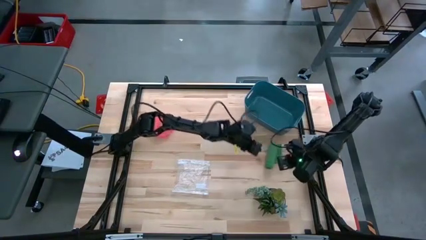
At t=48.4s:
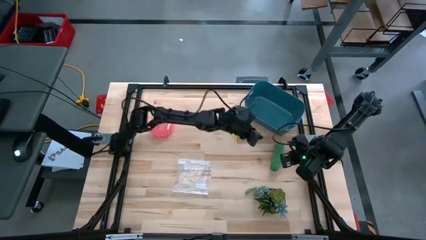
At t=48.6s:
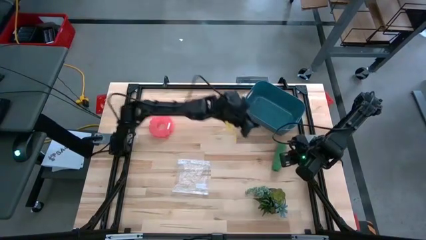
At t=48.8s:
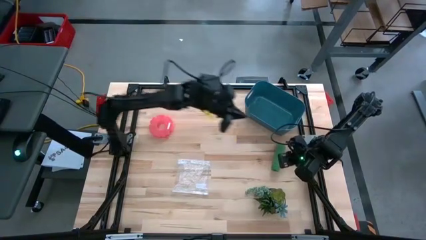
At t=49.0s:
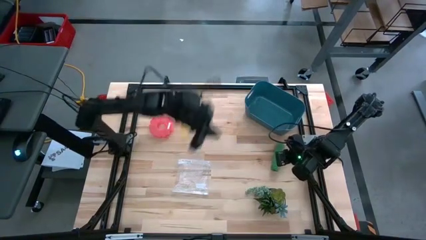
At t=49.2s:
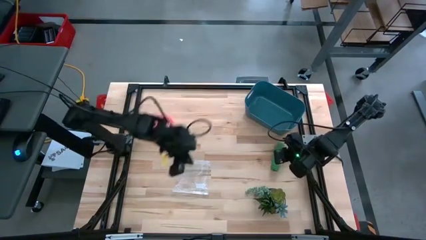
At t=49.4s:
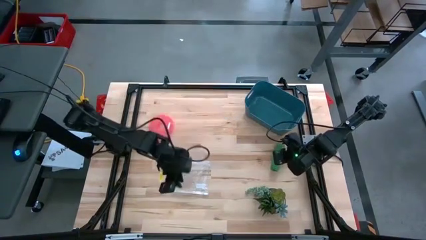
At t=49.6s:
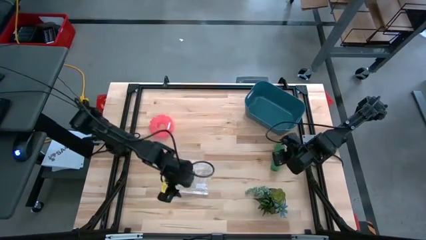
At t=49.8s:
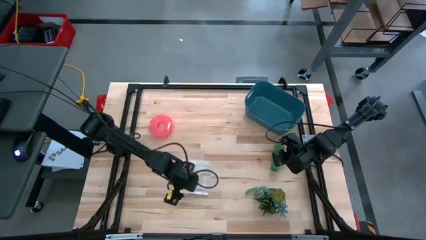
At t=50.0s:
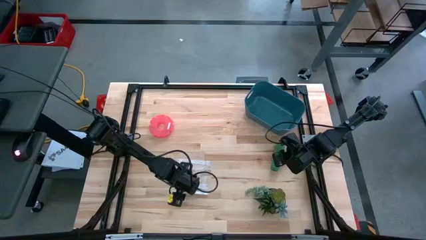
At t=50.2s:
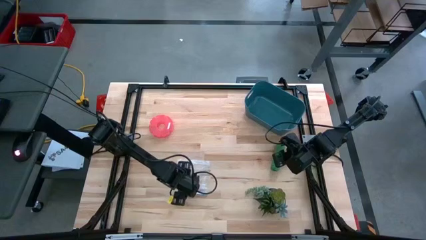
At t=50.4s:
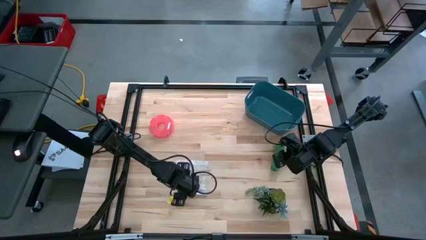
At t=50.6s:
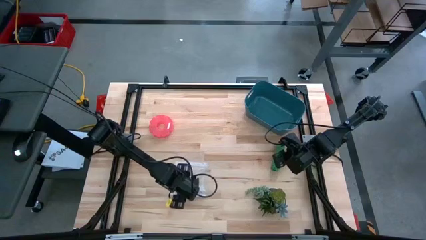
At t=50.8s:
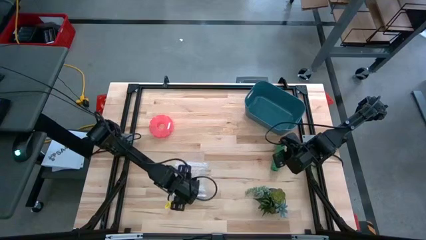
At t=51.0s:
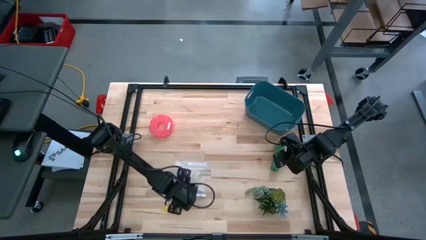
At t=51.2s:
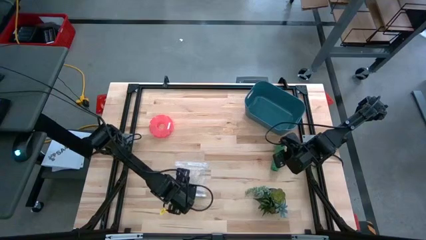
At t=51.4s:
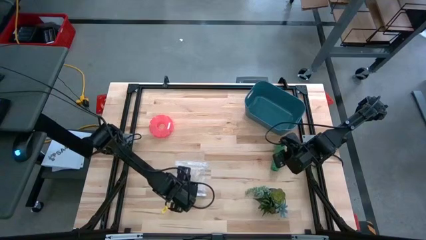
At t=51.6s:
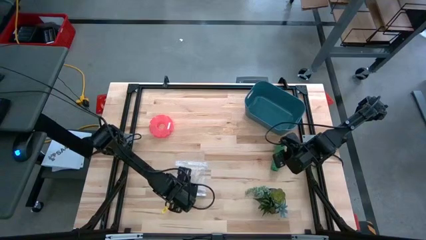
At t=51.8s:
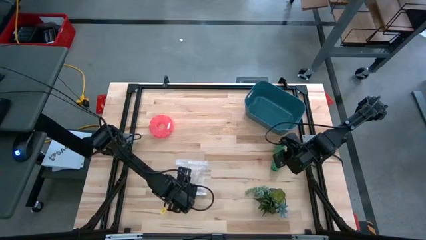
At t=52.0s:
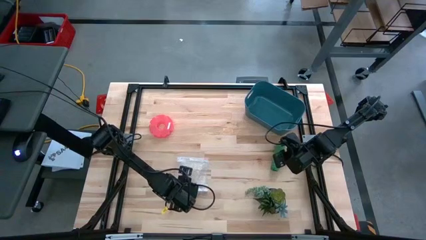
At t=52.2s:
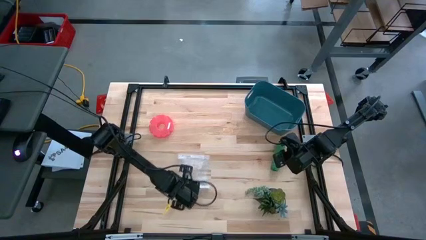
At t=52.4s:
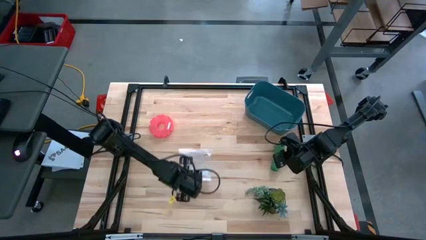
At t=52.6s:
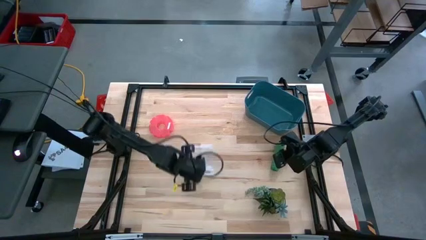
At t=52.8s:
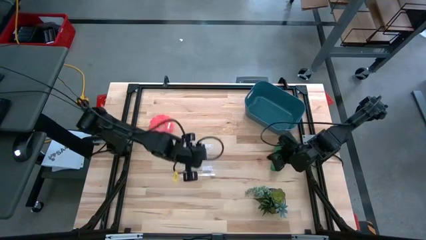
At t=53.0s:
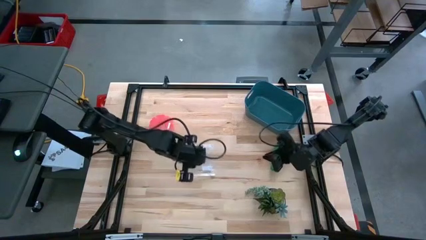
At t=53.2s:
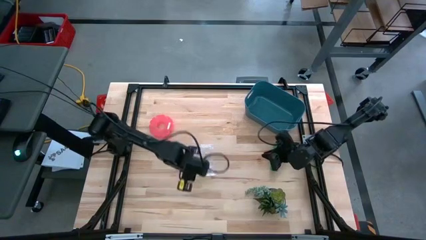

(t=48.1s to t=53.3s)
Task: Roll bandage
Put the rolled green bandage into the transparent zip bag

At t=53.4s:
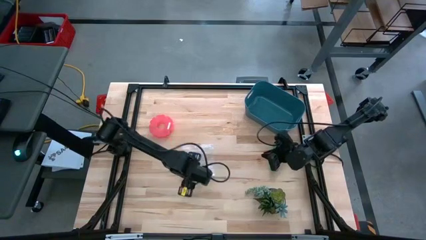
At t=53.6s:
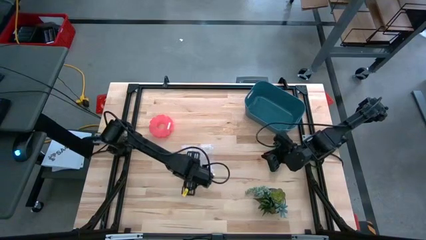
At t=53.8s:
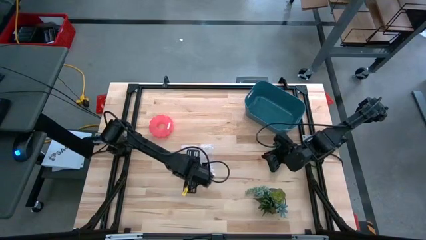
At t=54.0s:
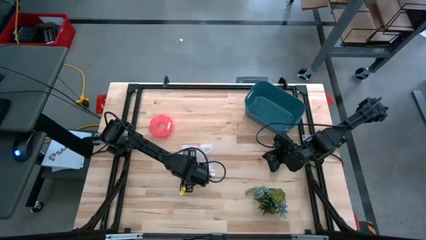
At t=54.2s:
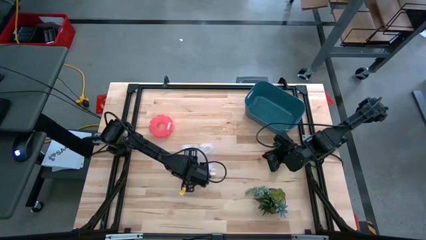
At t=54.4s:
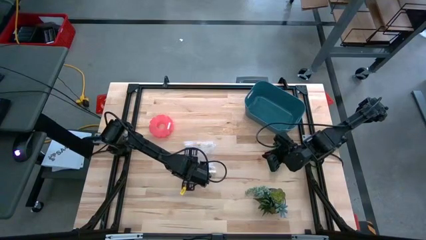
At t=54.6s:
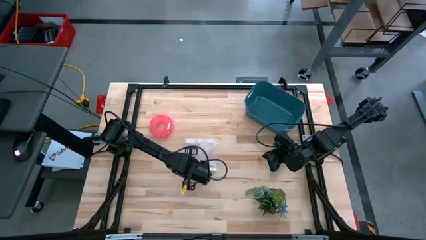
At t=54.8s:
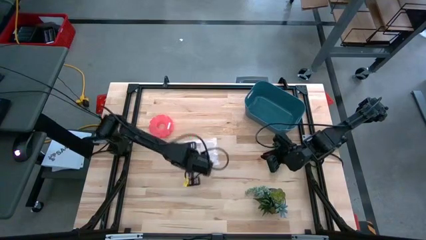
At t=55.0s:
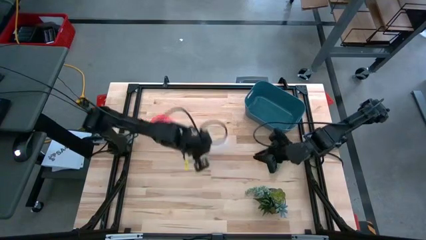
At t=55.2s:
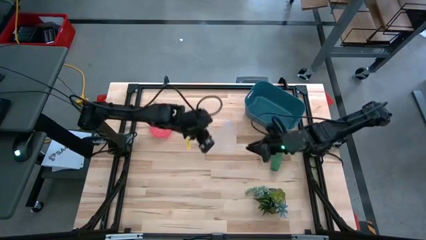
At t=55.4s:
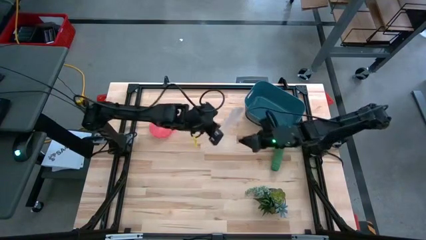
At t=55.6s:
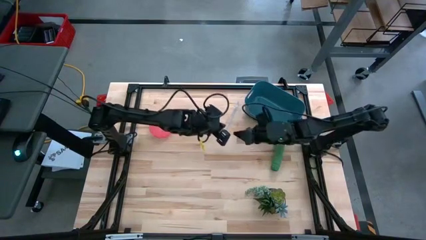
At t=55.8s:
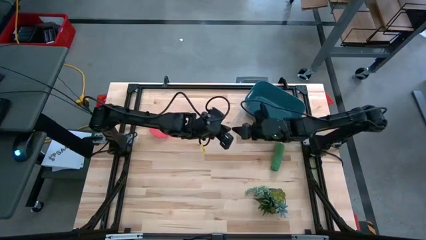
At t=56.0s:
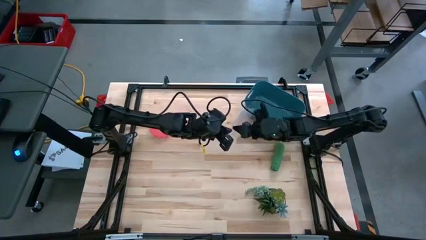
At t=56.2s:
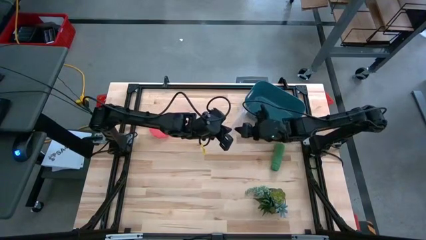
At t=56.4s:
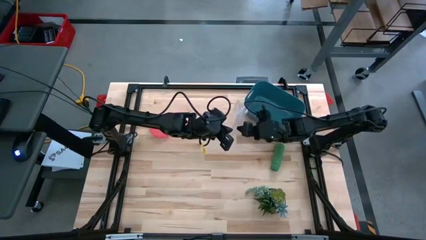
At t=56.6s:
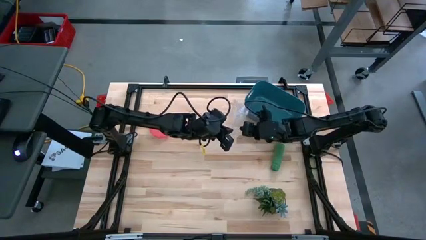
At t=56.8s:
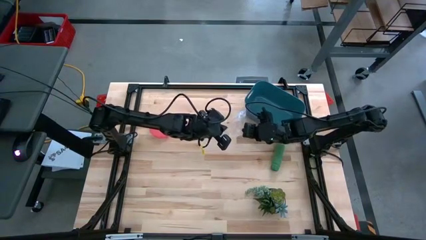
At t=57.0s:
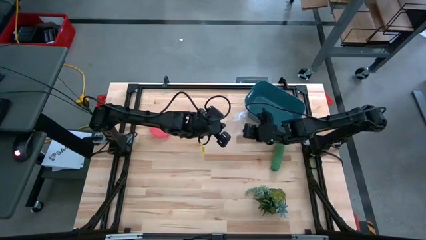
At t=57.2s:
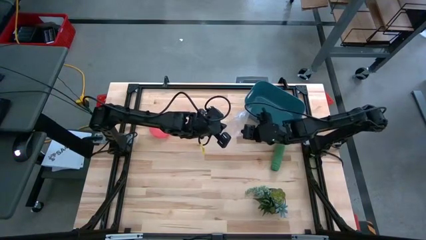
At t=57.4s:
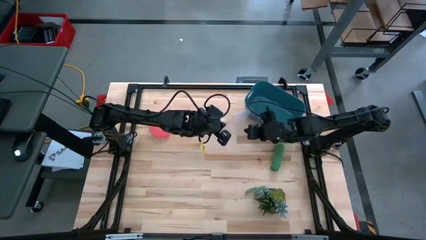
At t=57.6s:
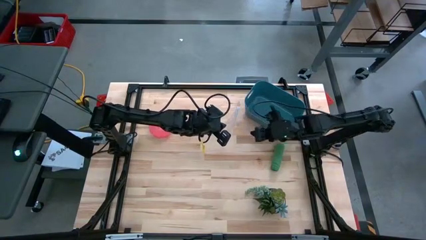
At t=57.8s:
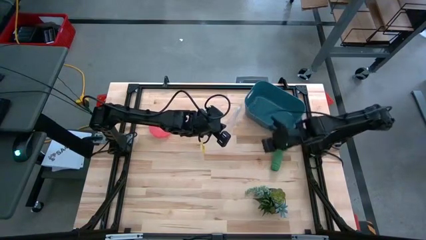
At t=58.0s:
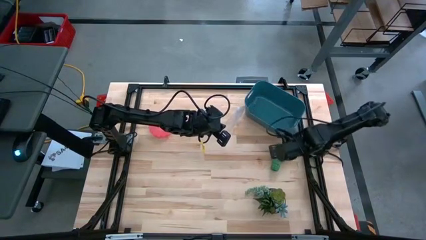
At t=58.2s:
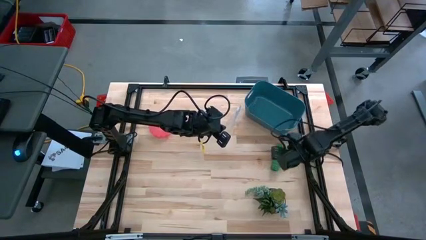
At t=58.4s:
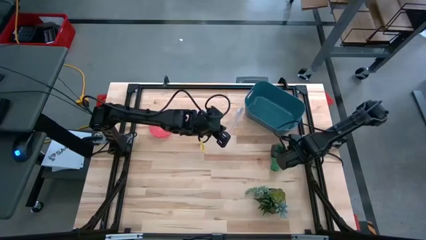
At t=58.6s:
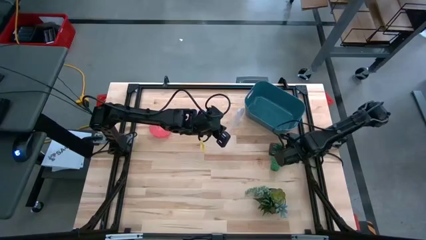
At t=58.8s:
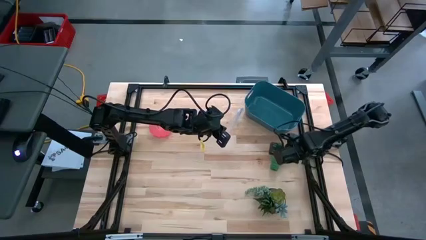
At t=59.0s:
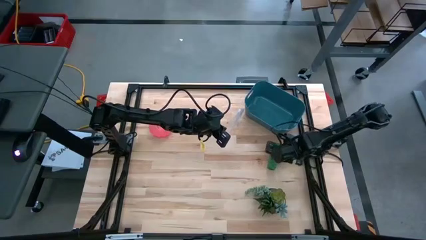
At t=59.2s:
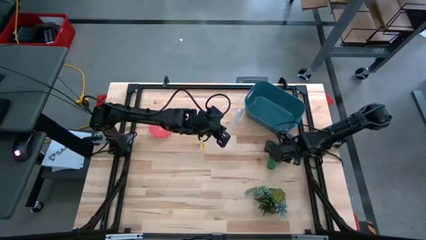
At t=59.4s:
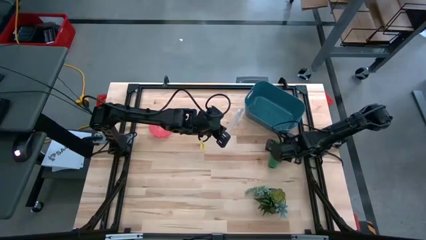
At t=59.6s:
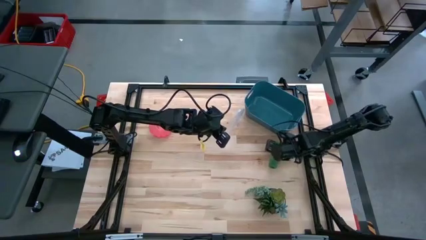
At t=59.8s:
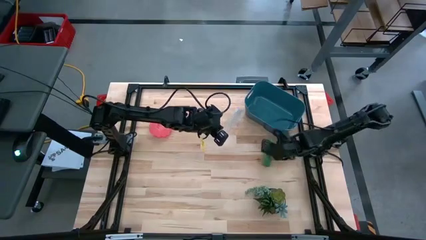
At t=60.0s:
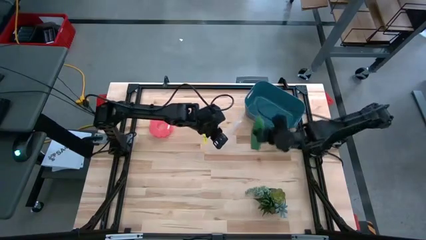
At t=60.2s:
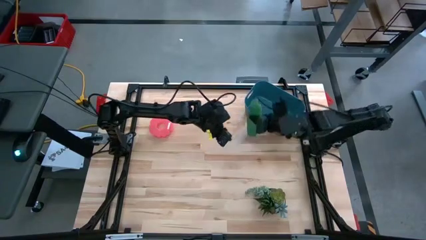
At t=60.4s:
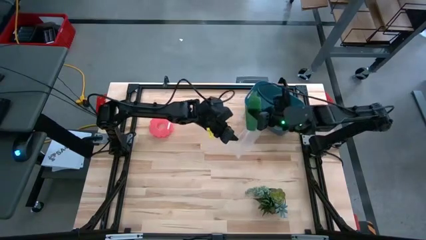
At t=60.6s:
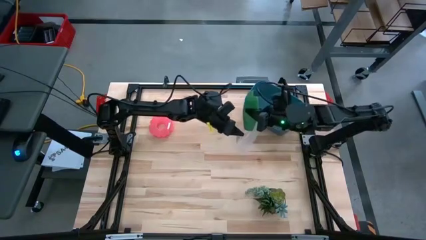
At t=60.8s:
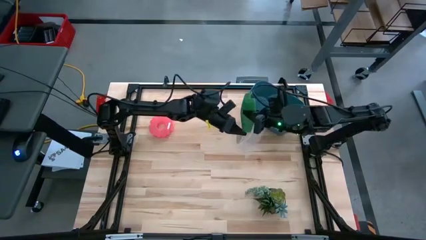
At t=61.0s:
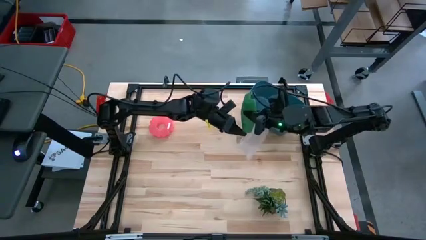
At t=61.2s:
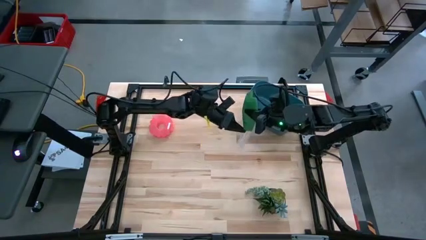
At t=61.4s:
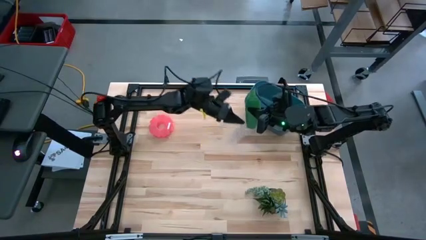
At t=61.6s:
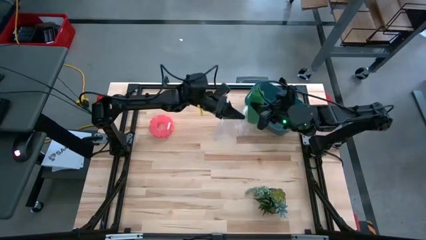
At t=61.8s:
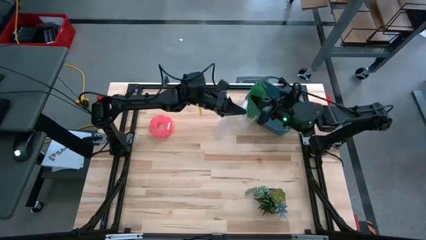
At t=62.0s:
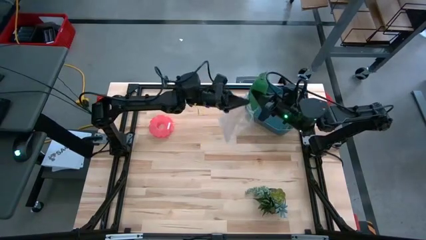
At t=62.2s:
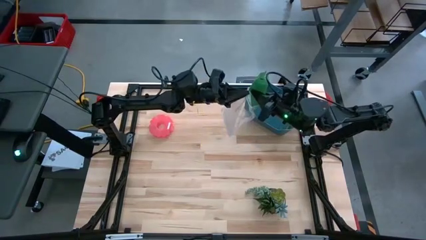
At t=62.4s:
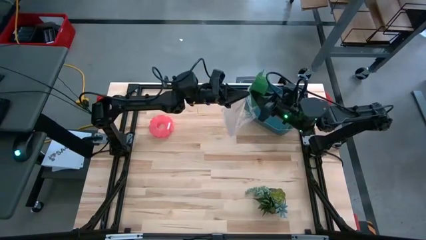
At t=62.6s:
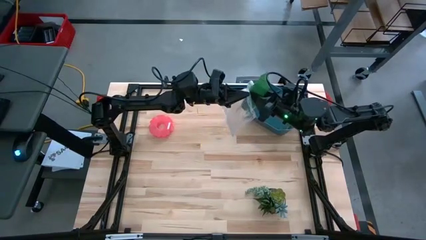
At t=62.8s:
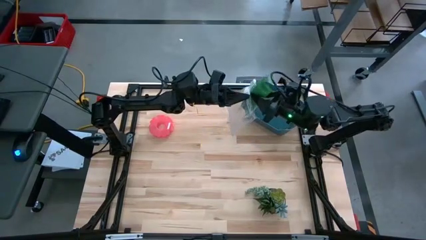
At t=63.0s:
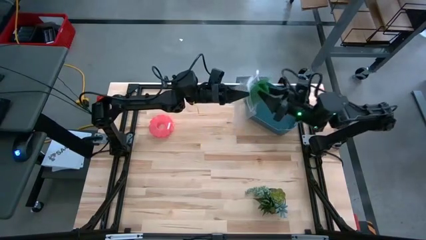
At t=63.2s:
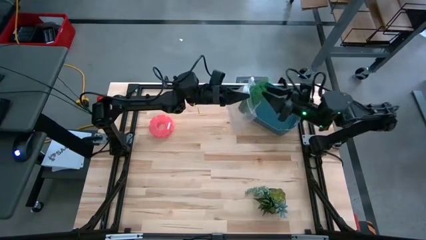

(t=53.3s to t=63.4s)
Put the rolled green bandage into the transparent zip bag
